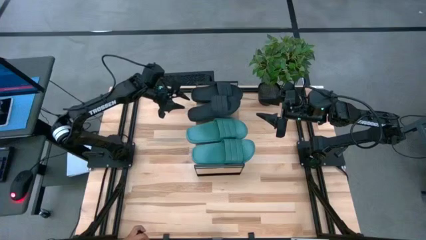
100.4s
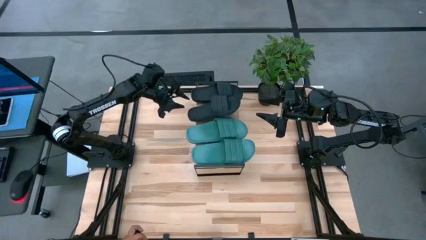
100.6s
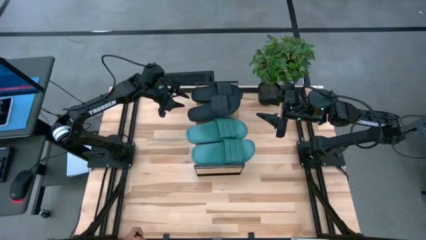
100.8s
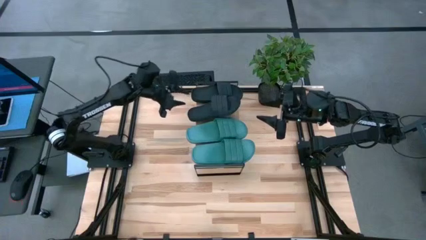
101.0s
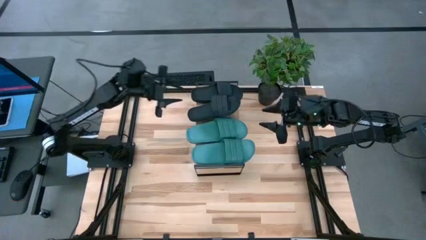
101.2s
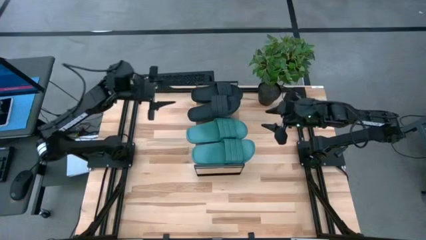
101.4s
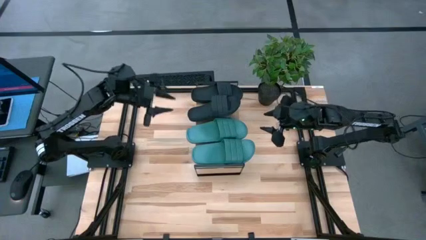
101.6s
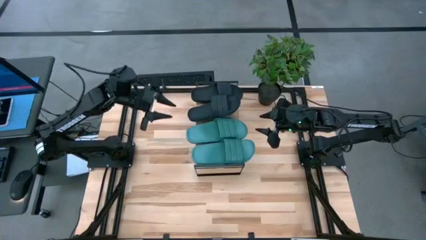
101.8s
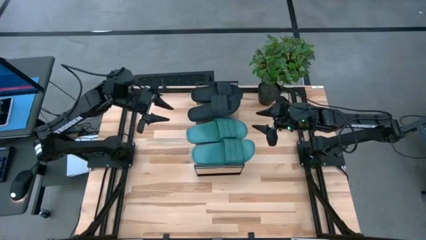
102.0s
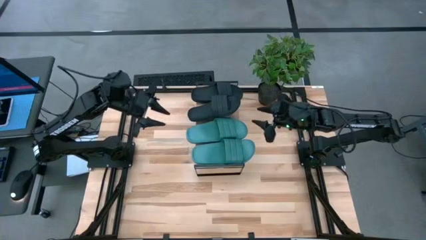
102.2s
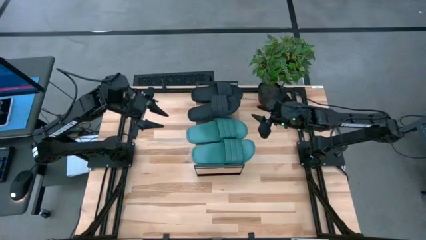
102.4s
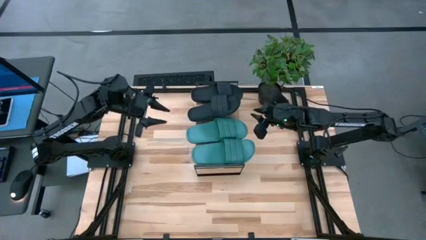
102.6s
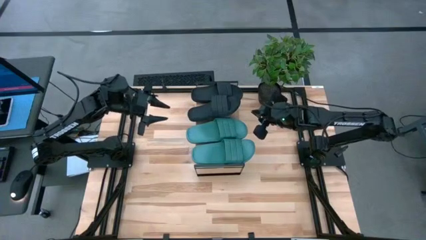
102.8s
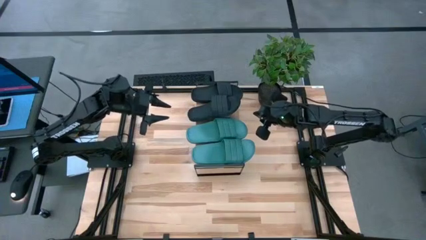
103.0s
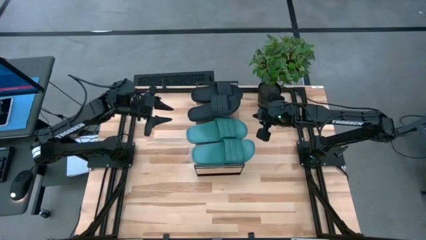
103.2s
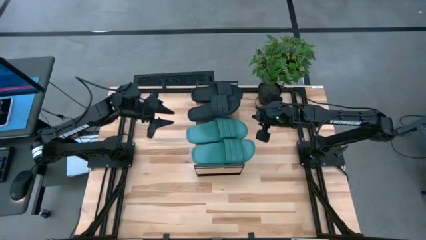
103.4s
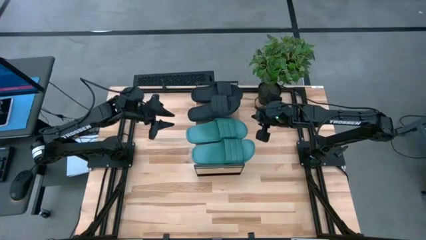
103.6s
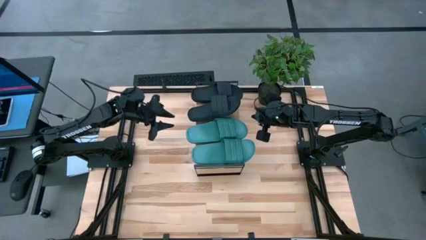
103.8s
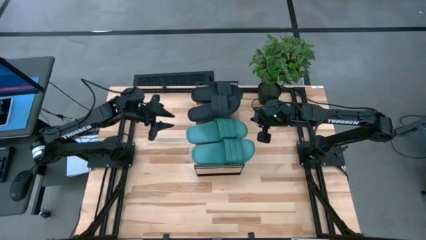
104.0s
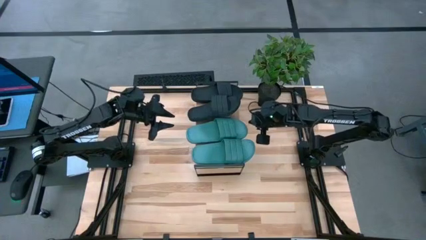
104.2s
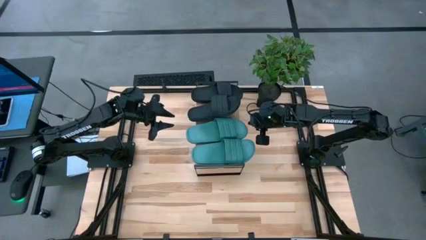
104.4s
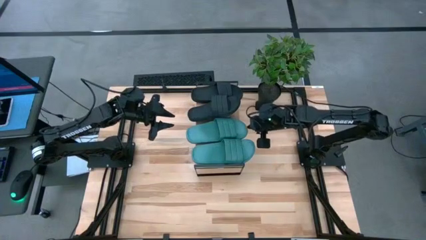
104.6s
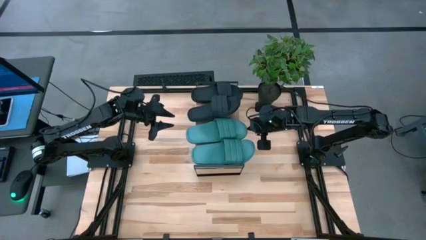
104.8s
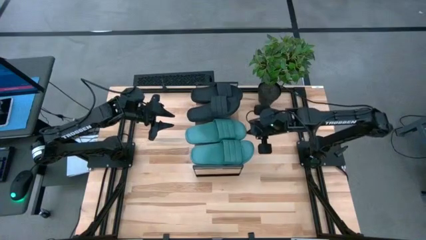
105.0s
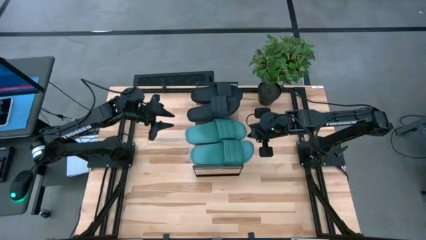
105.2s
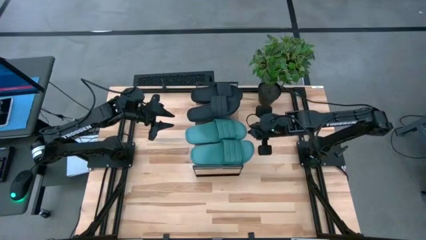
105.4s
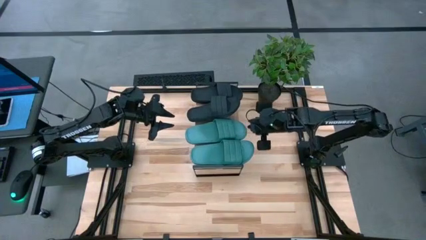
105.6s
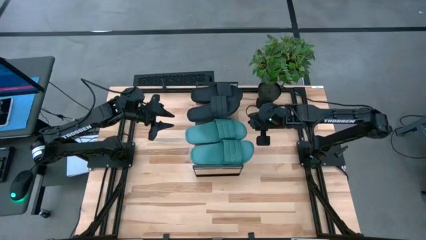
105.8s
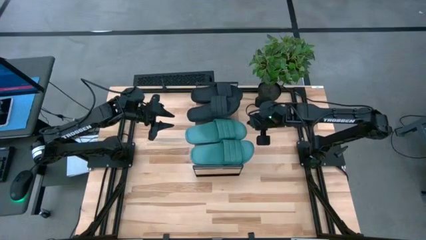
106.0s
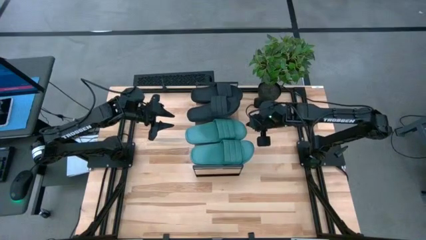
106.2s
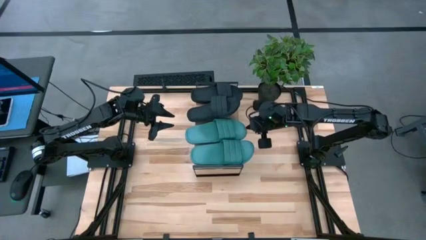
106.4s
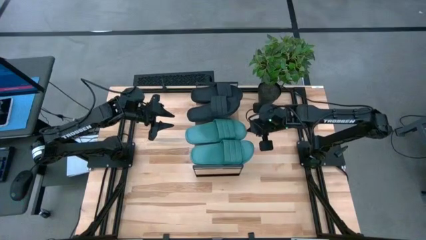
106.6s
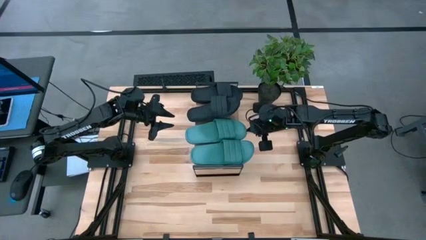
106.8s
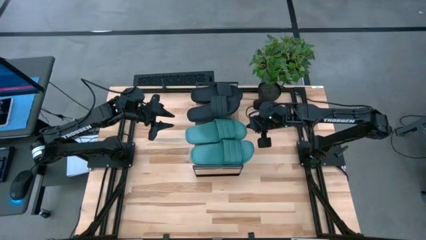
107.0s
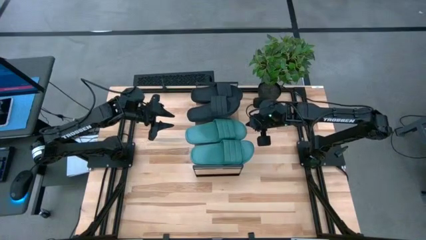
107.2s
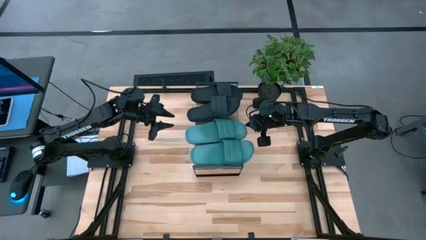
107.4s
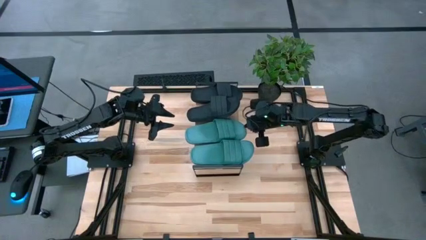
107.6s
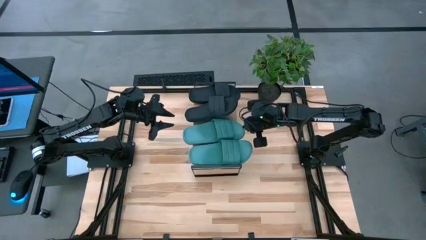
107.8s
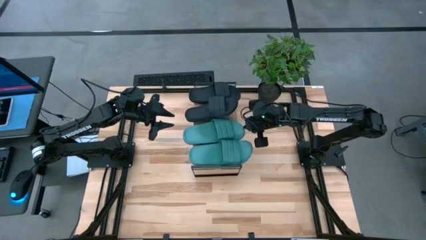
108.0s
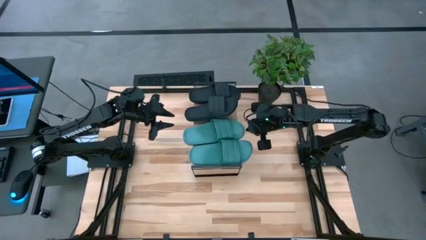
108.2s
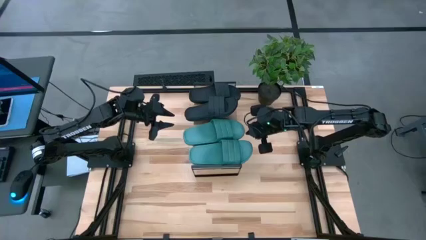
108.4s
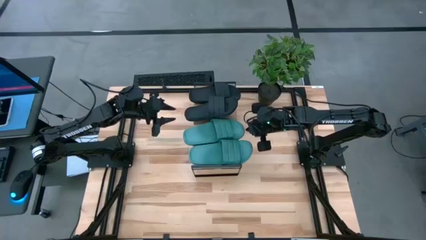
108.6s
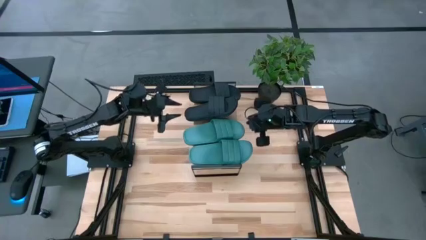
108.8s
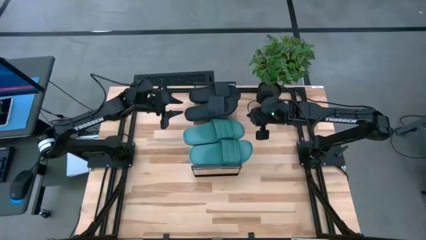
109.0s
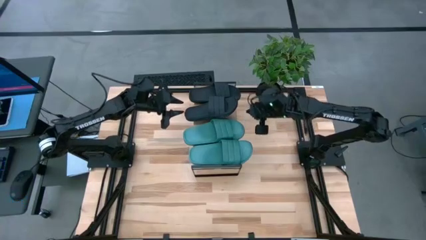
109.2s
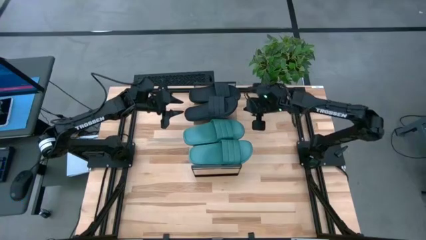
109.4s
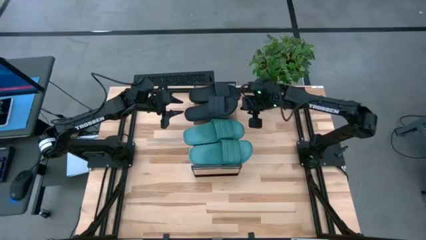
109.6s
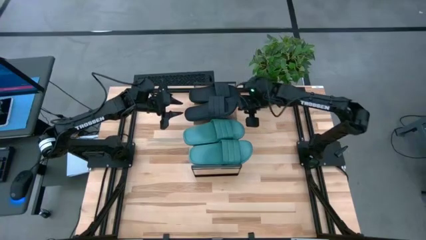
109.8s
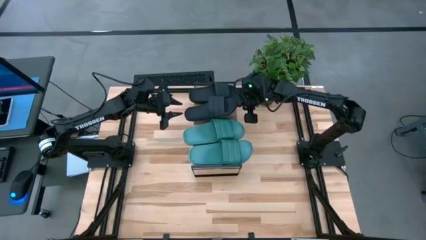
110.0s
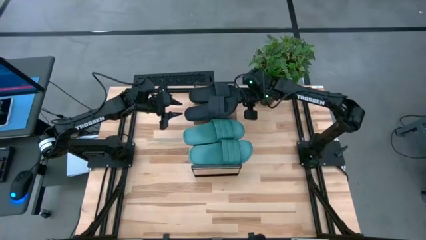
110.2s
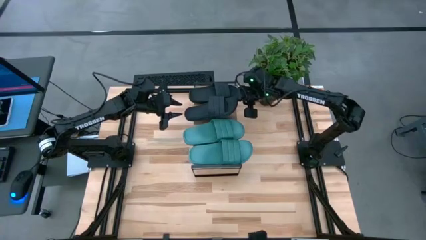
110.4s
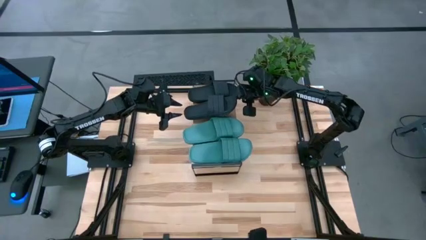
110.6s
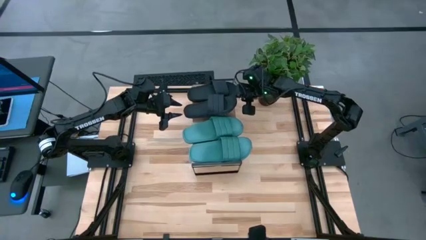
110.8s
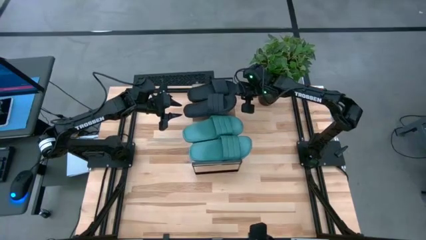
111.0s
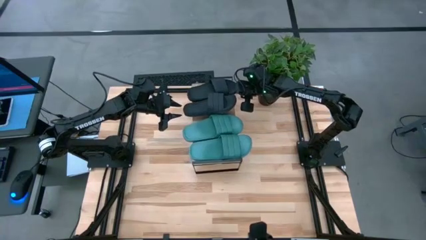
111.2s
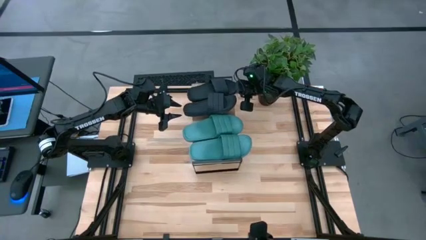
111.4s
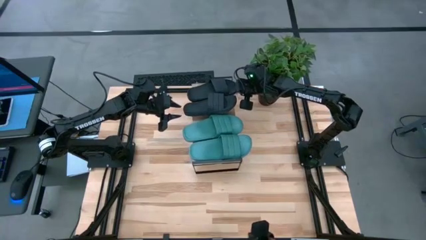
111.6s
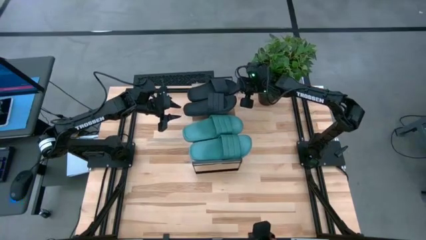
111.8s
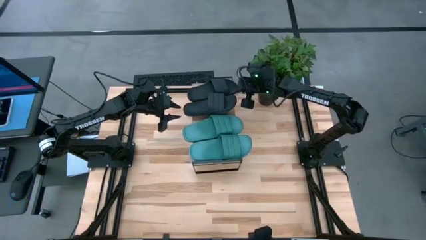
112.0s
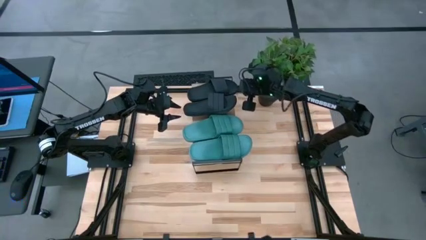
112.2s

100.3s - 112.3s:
Task: Pick and place slides into the shelf
Adjust the slippers on the shelf
